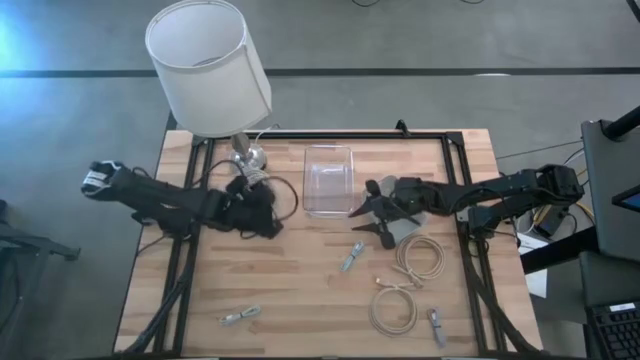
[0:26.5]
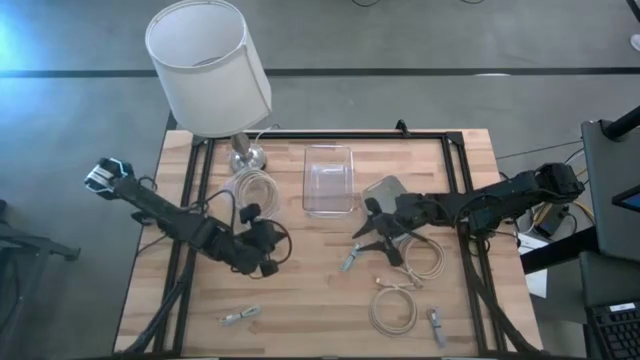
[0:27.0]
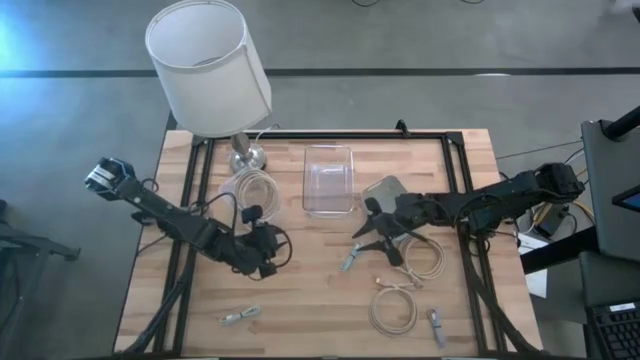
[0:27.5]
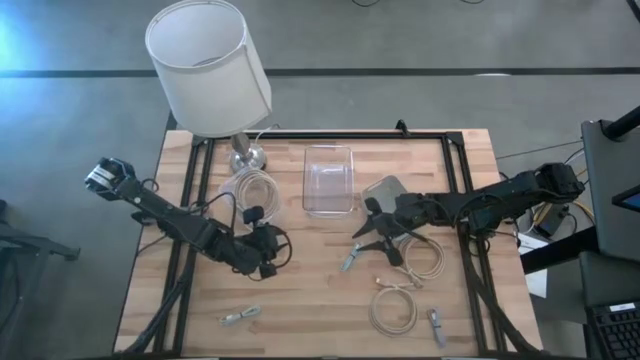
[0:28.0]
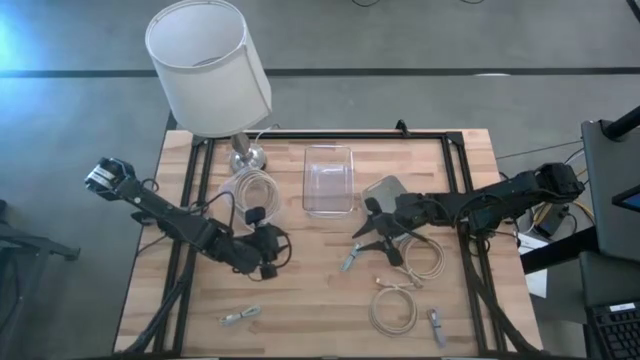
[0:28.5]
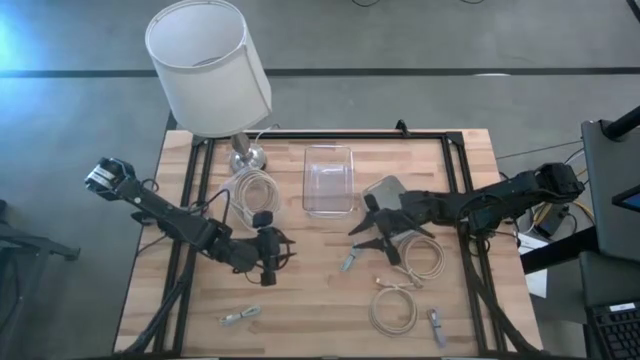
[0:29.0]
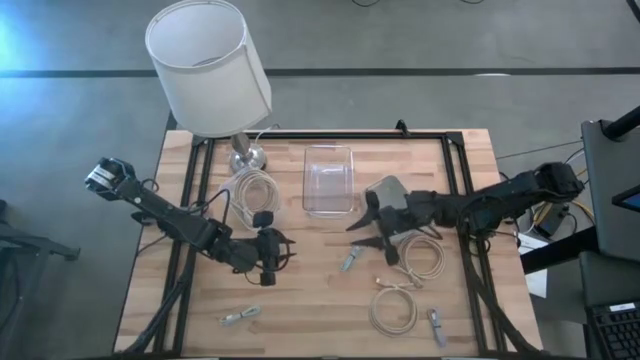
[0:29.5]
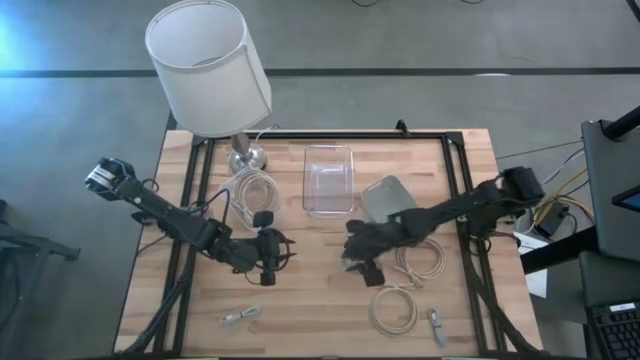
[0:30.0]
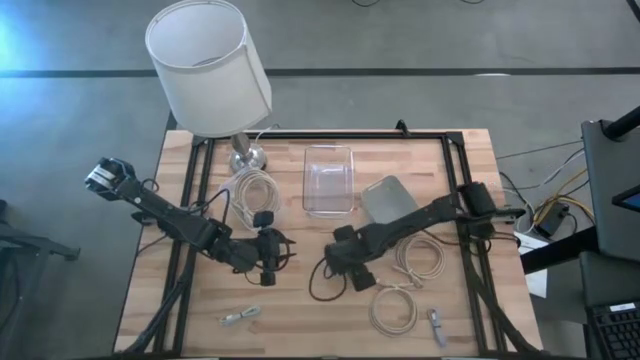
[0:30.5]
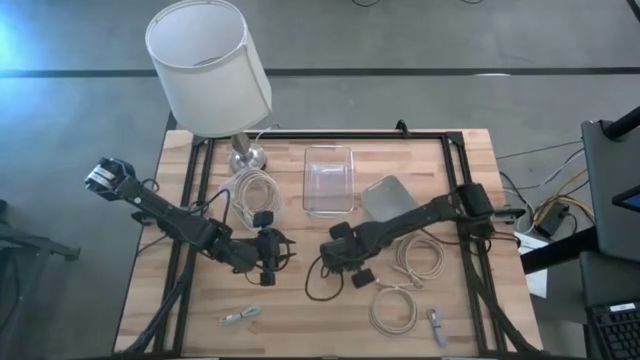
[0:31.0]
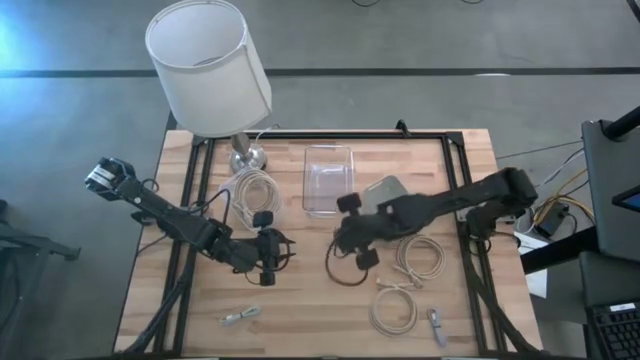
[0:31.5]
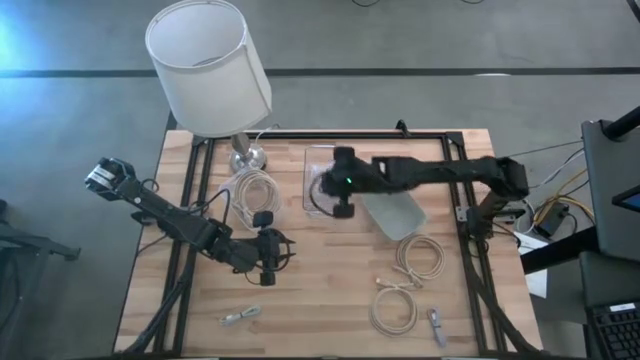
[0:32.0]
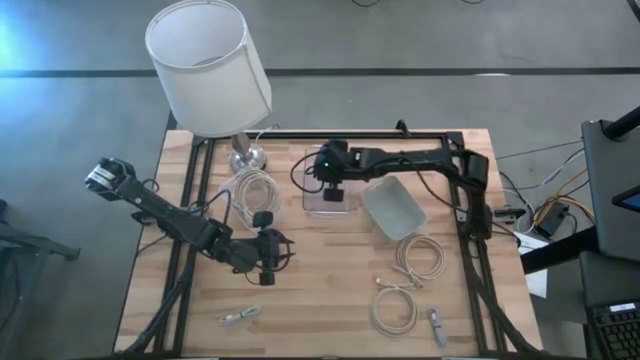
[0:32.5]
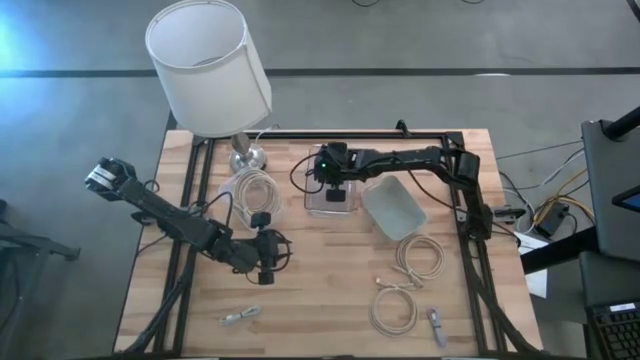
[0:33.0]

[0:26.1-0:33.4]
Task: Pick & Place USB Port
Put the blue charger cable into the transparent bin

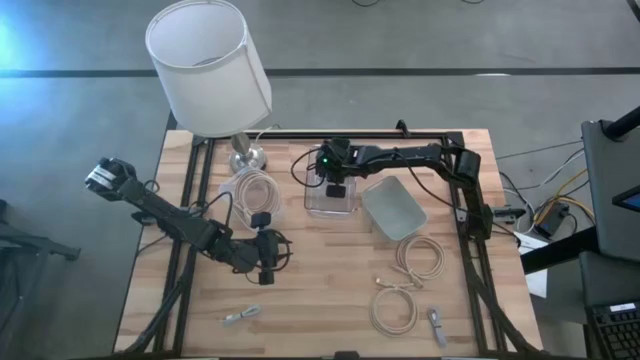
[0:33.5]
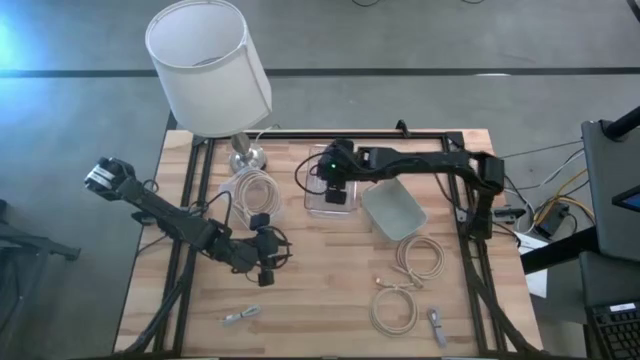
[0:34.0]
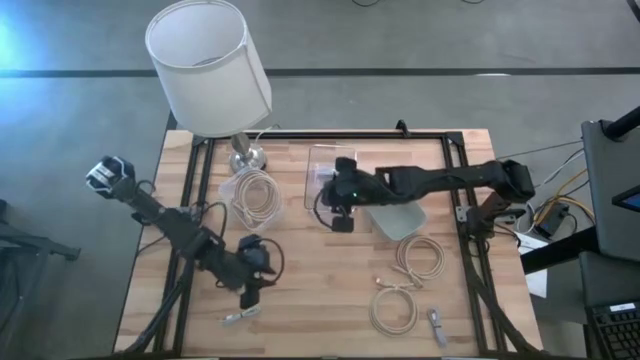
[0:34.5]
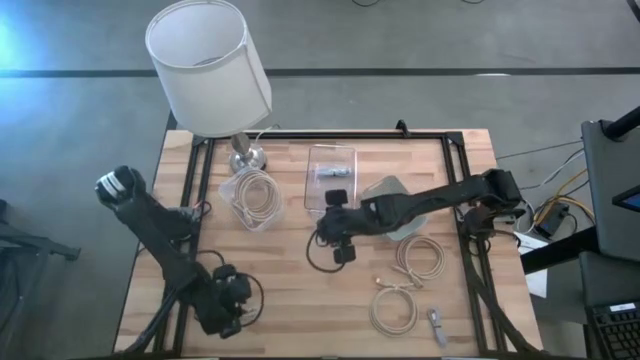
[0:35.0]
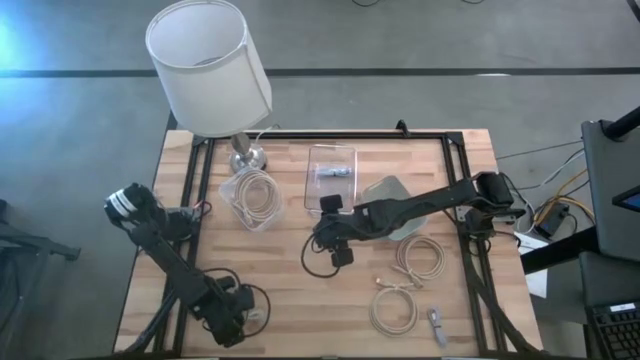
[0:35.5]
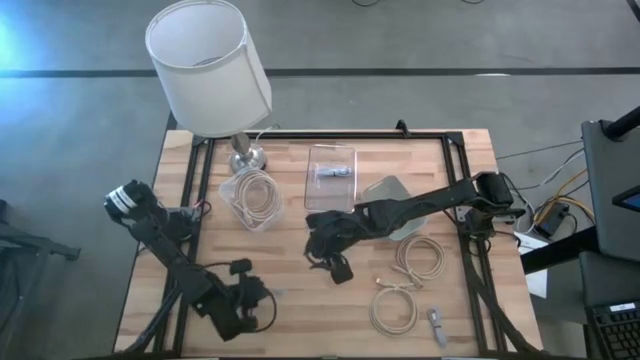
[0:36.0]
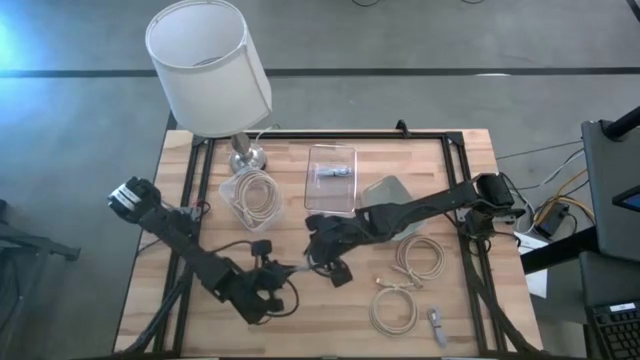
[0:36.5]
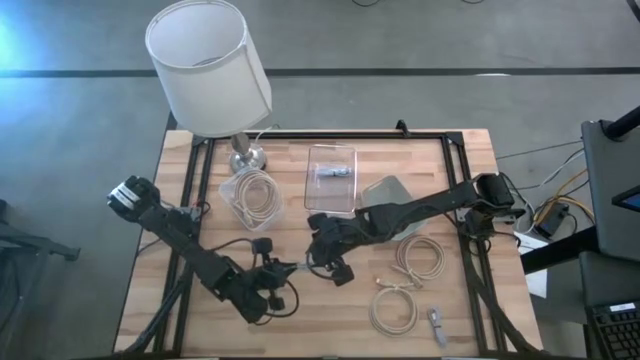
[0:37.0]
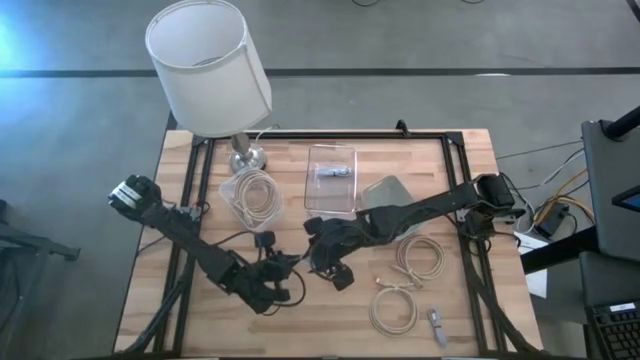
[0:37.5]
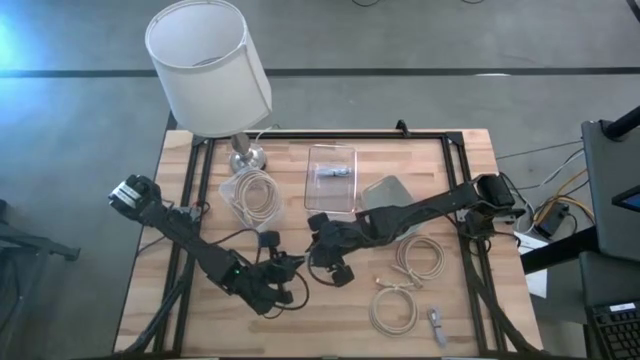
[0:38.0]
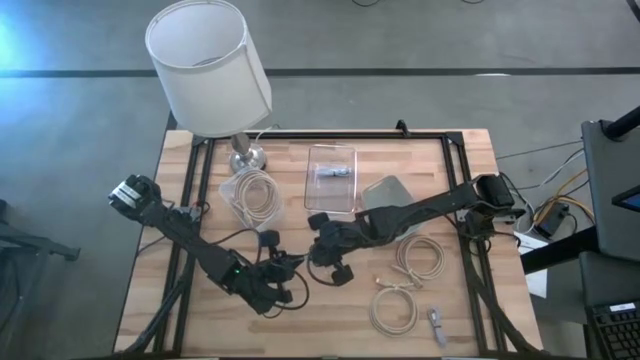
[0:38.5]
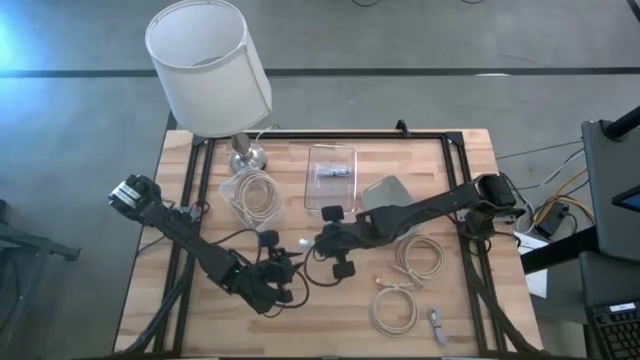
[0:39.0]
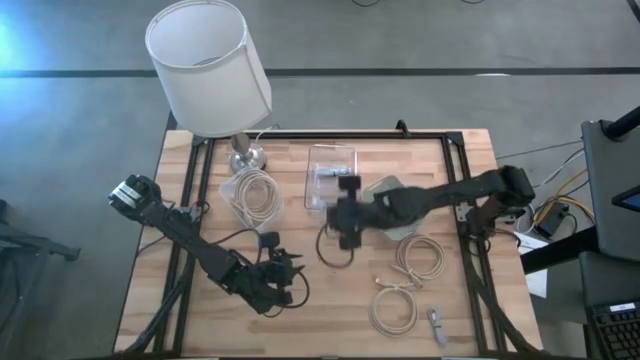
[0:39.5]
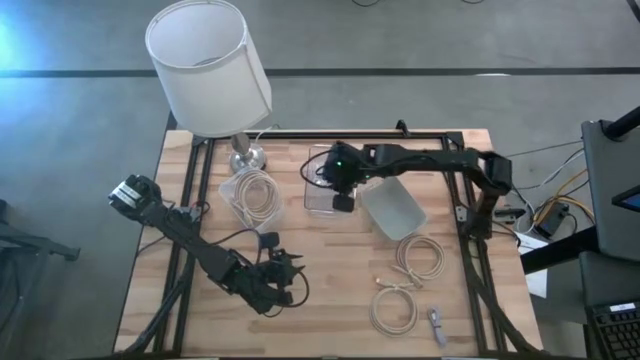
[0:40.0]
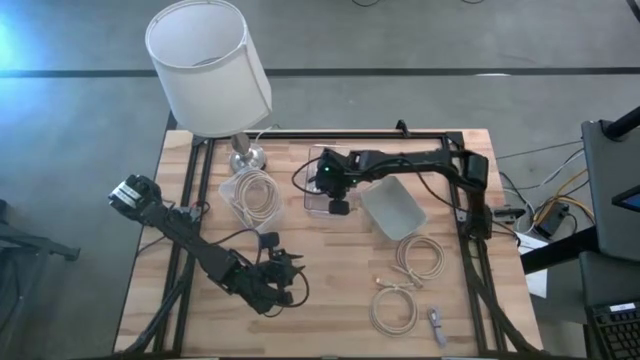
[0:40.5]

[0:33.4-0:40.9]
Put the blue charger cable into the transparent bin

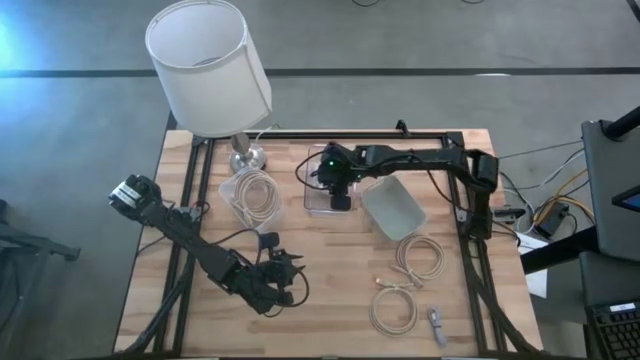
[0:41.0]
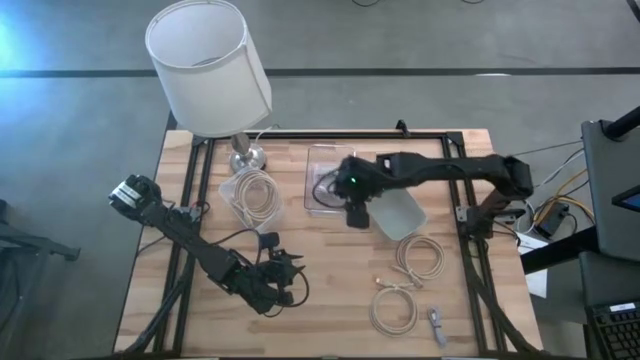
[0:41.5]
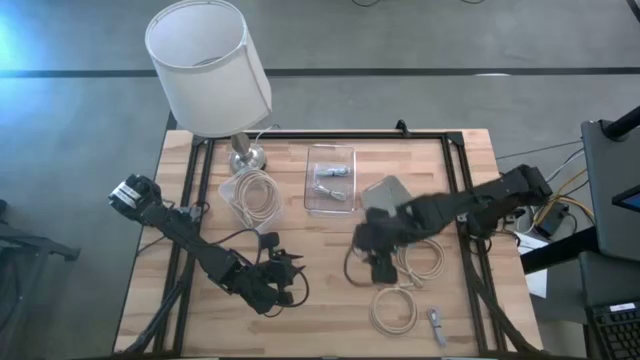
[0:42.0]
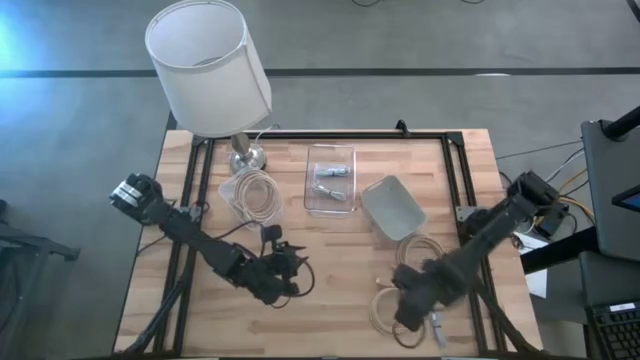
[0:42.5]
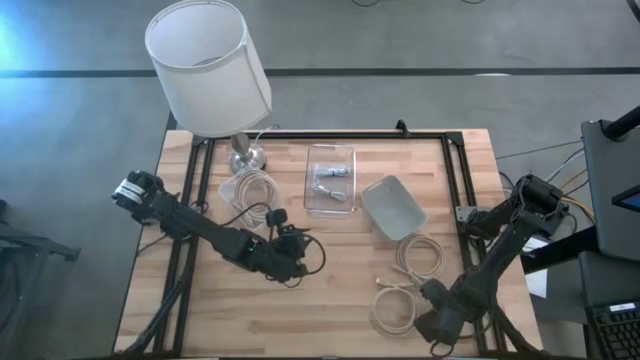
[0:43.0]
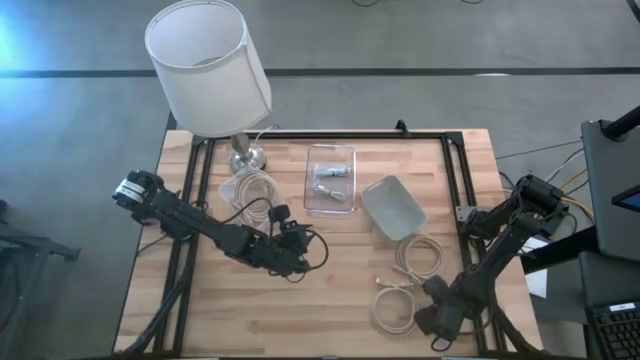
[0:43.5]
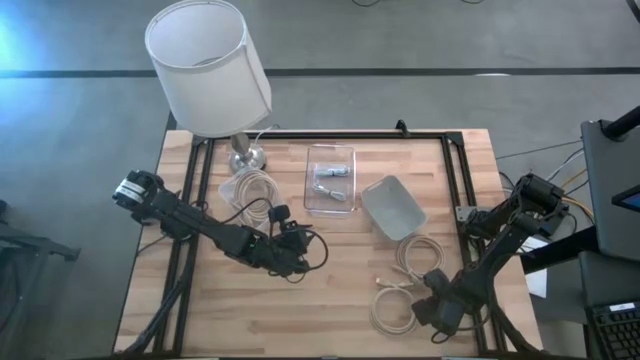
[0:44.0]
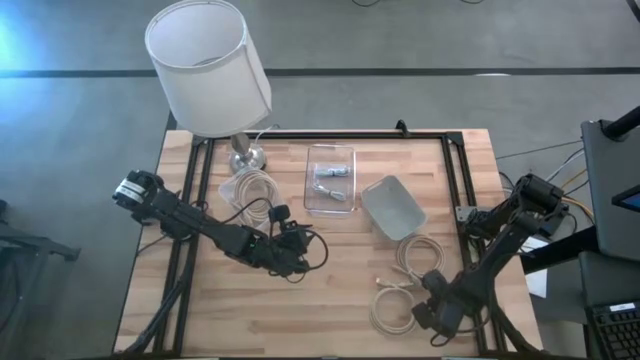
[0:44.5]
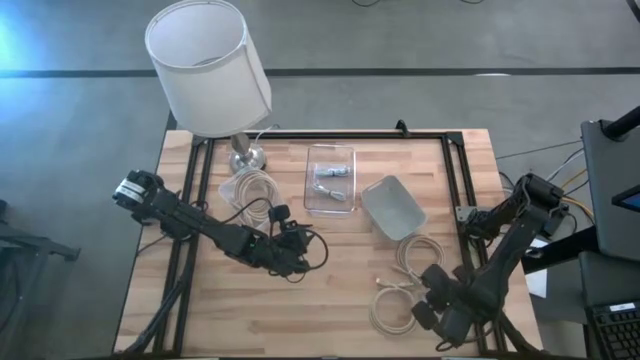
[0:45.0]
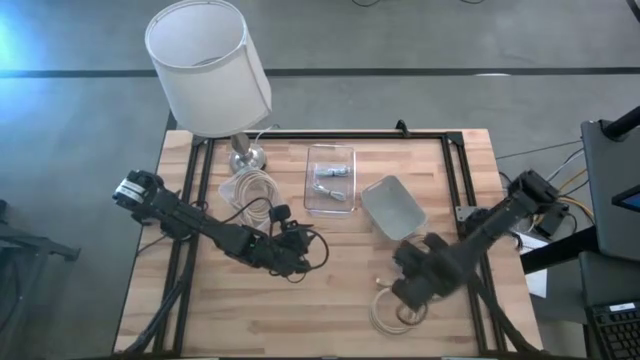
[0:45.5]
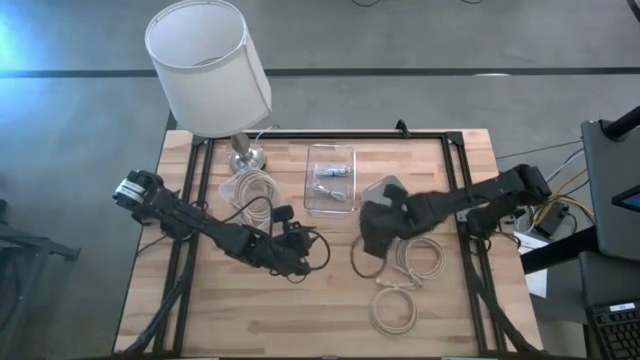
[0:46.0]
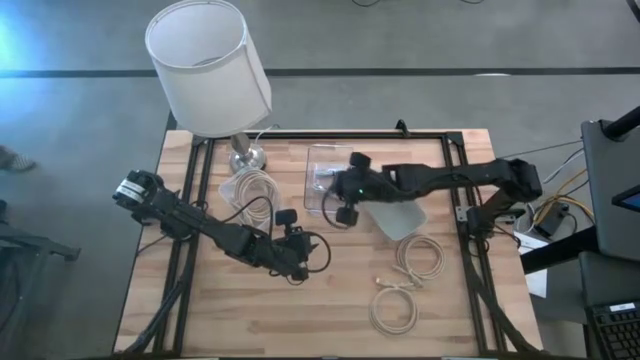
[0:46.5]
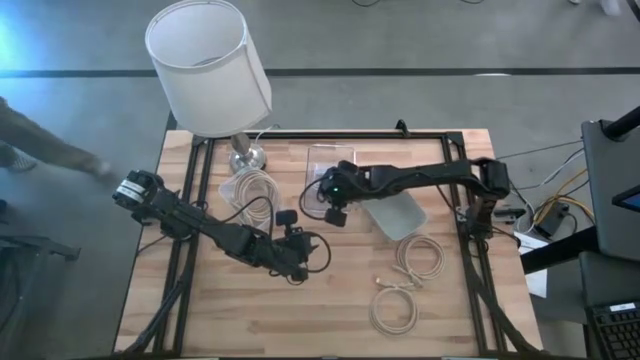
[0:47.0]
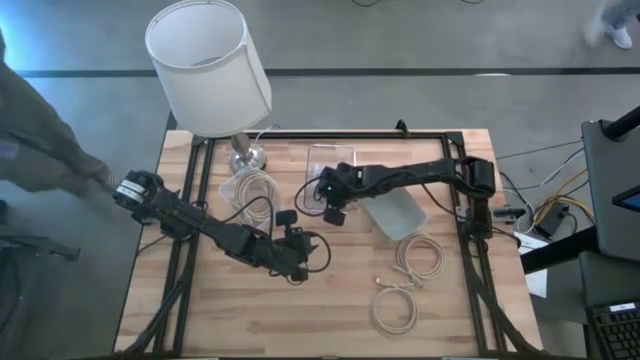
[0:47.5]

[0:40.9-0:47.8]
Put the blue charger cable into the transparent bin

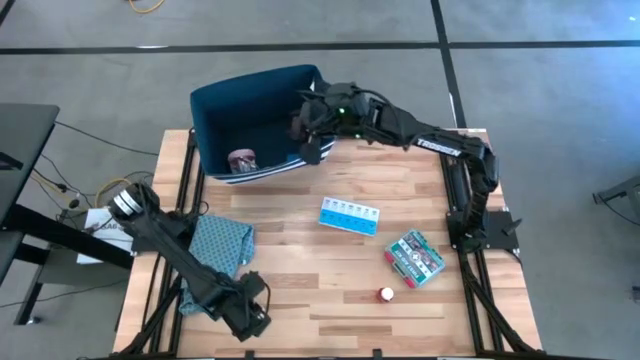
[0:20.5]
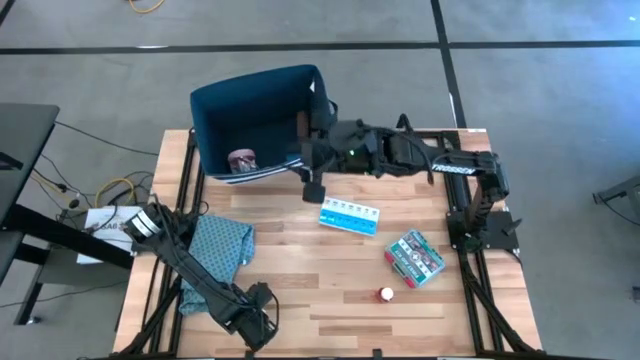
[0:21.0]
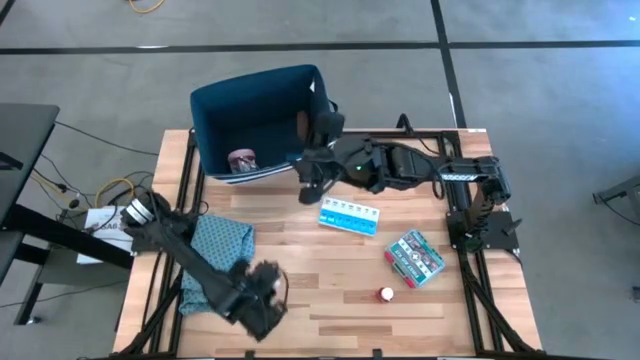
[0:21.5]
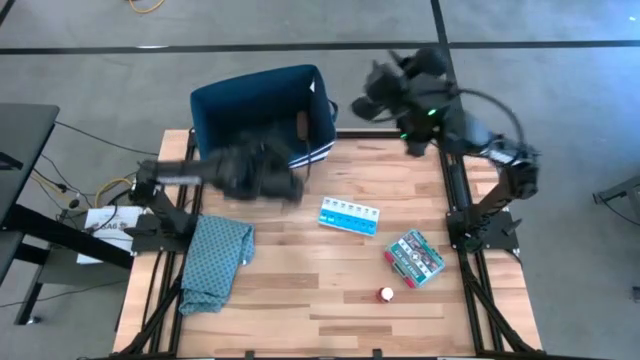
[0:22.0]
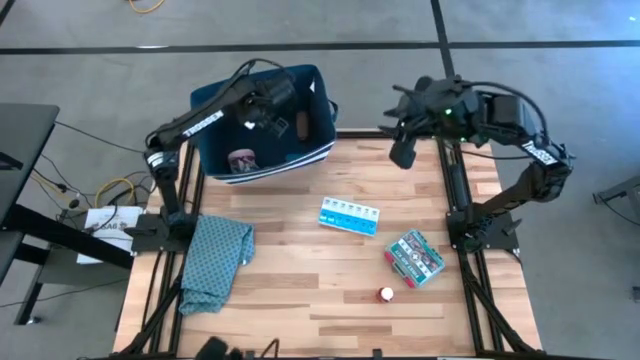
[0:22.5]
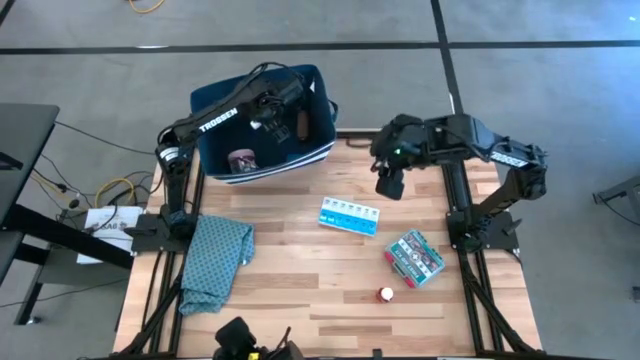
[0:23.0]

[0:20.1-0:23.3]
Task: Pick & place medical supplies in basket/bin
Put the white rolled gauze into the blue bin
